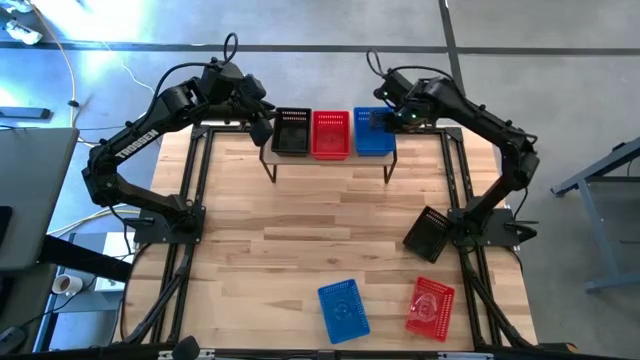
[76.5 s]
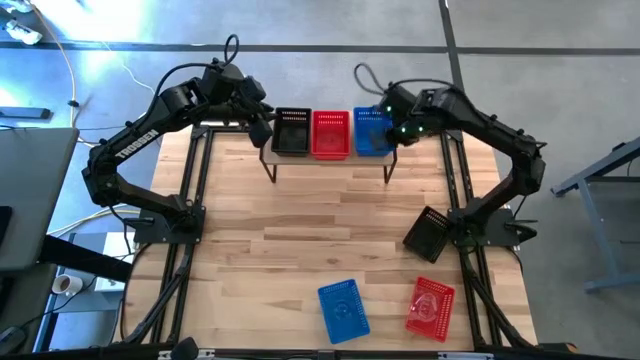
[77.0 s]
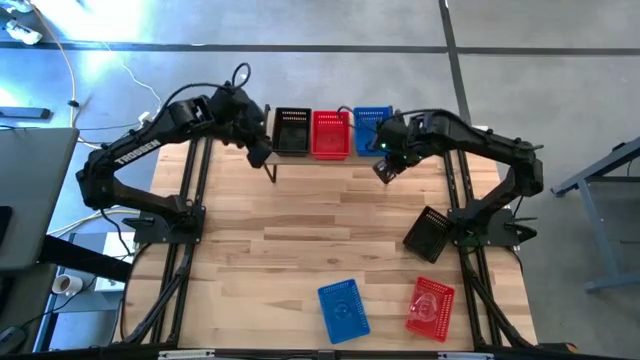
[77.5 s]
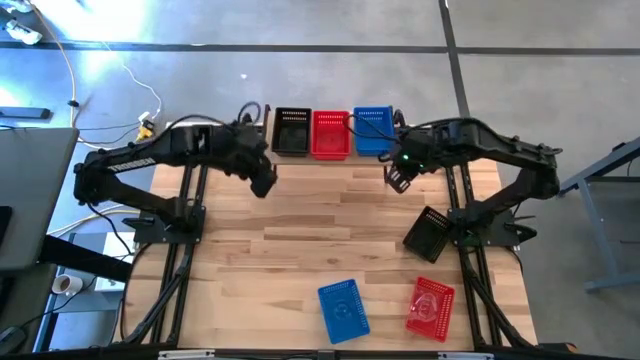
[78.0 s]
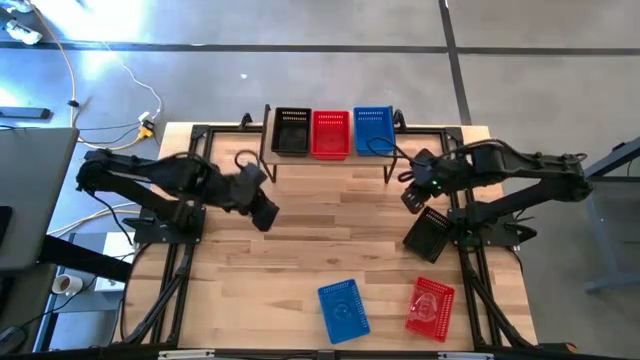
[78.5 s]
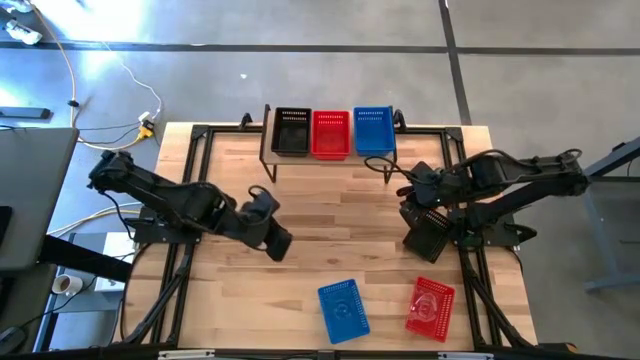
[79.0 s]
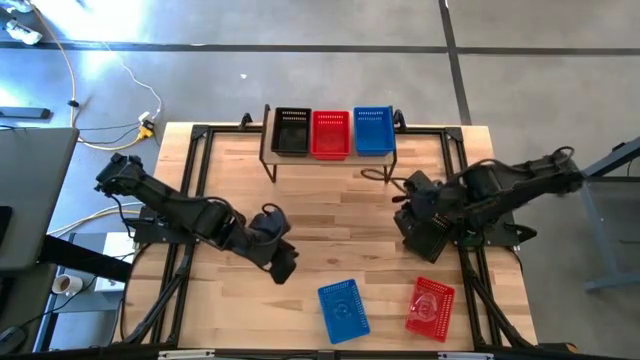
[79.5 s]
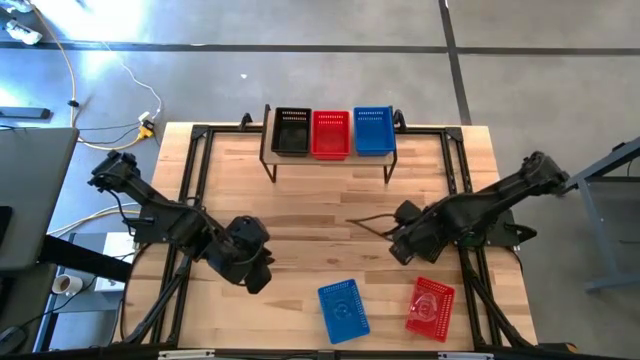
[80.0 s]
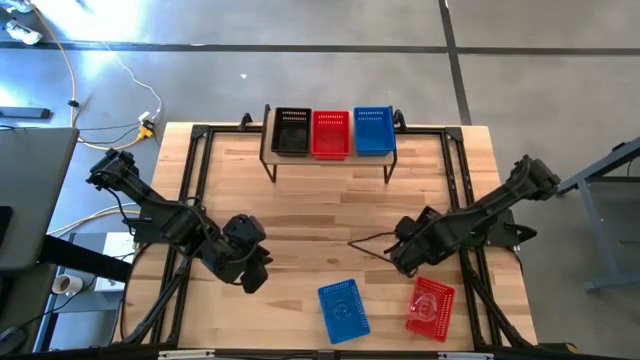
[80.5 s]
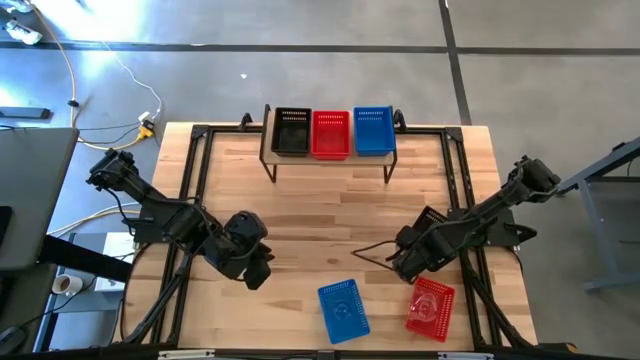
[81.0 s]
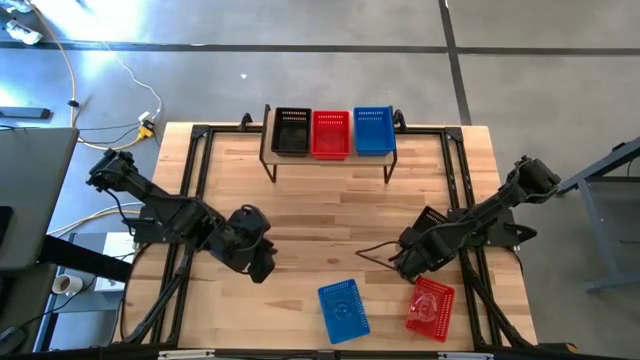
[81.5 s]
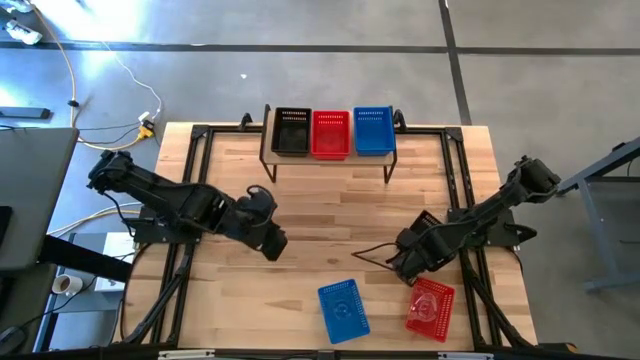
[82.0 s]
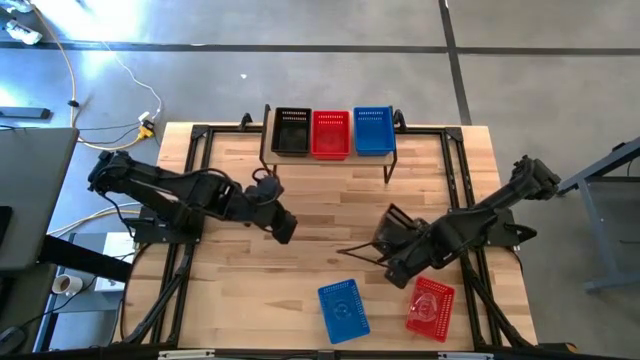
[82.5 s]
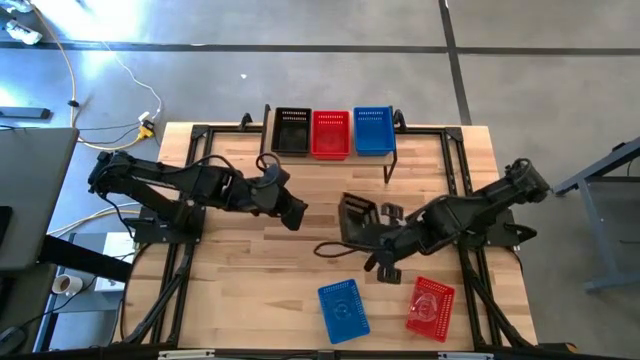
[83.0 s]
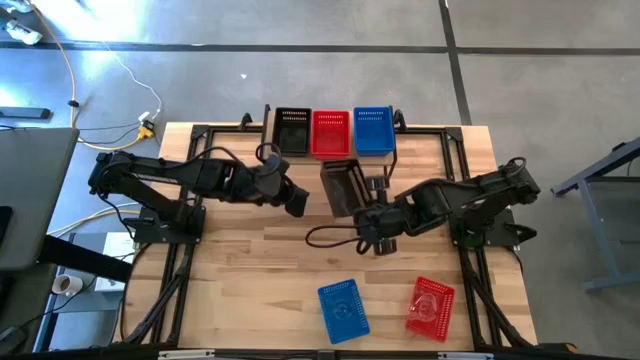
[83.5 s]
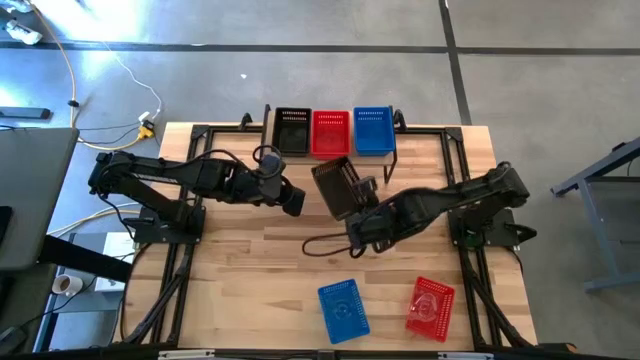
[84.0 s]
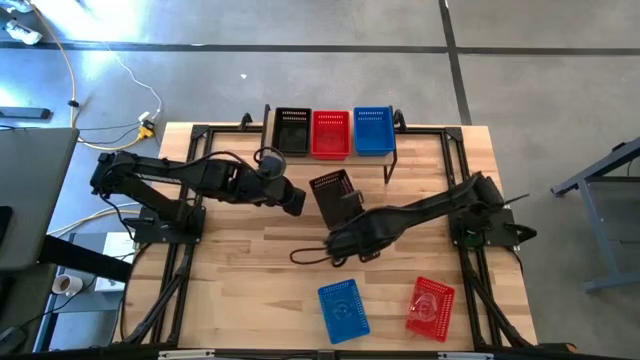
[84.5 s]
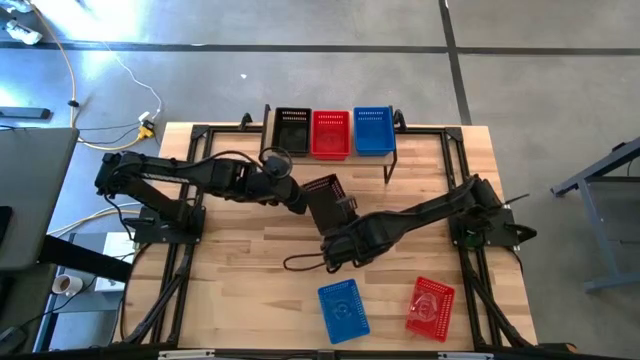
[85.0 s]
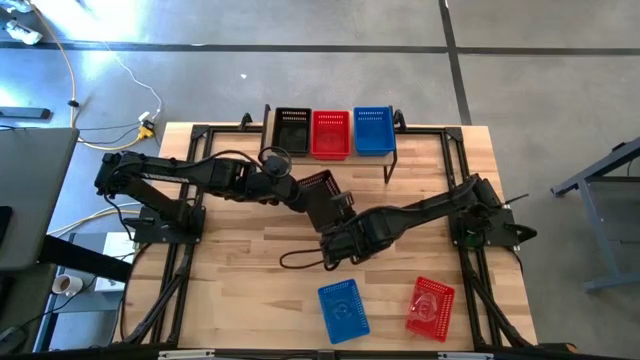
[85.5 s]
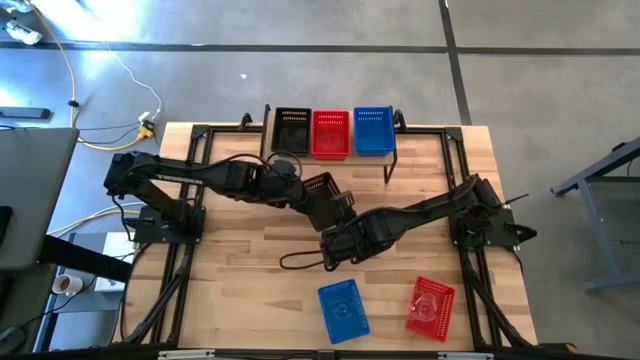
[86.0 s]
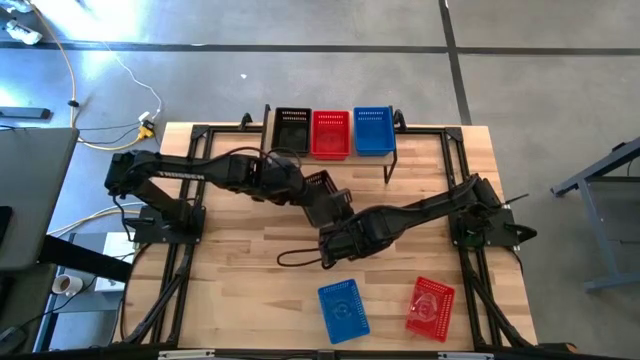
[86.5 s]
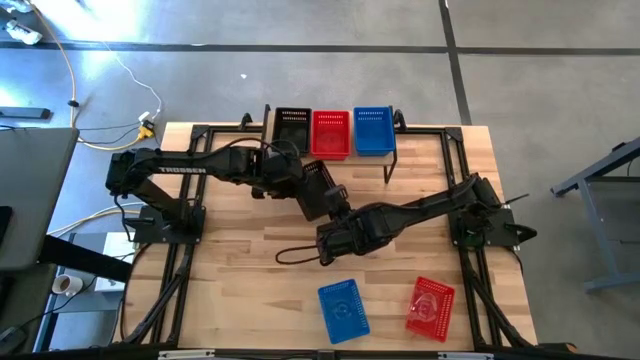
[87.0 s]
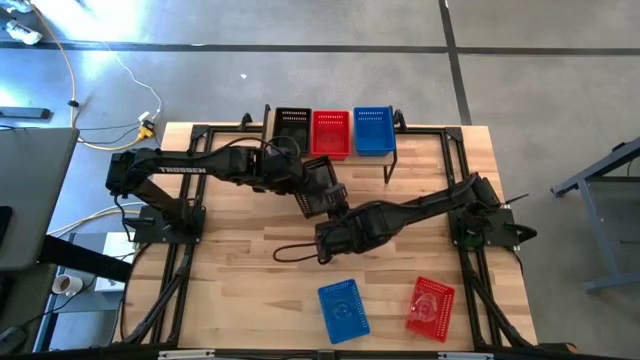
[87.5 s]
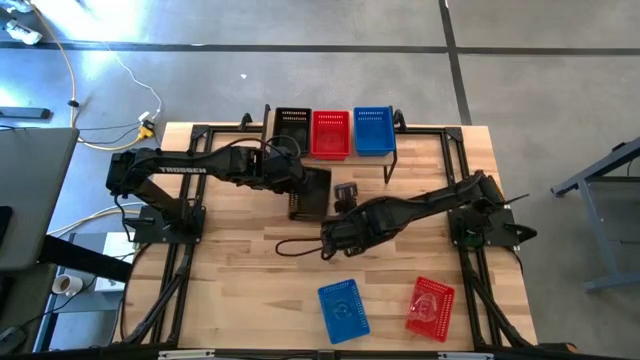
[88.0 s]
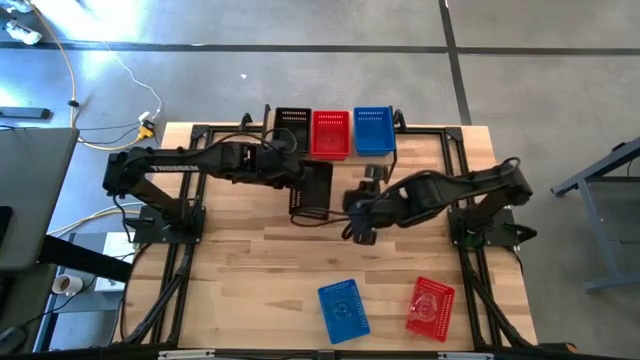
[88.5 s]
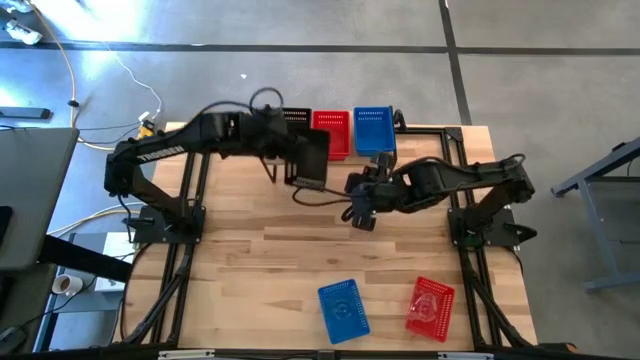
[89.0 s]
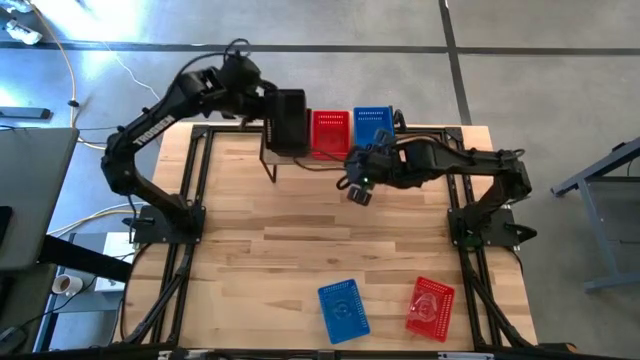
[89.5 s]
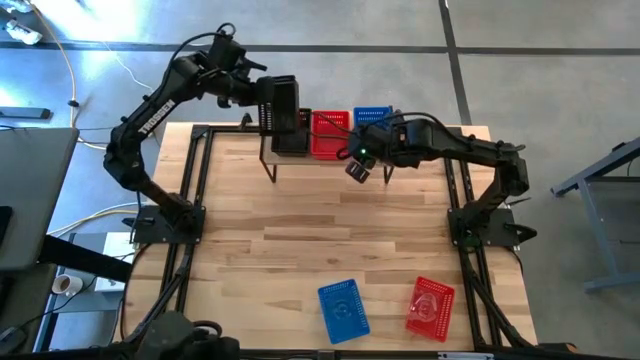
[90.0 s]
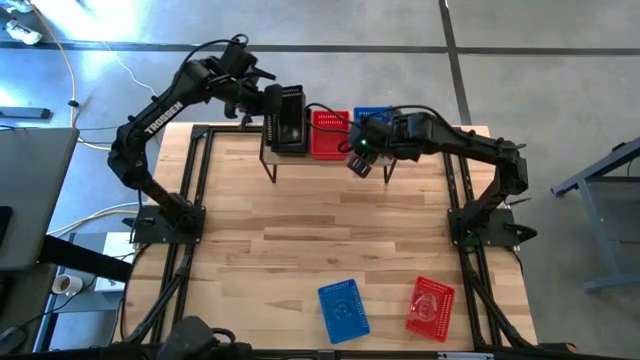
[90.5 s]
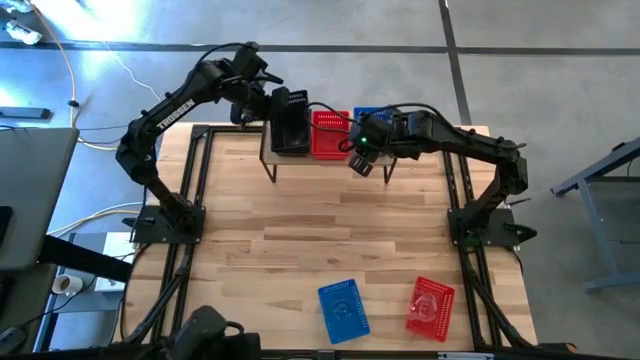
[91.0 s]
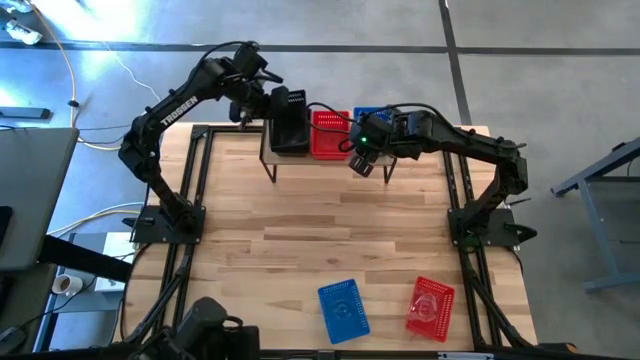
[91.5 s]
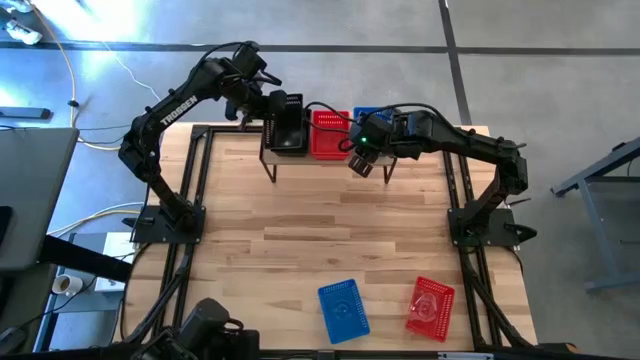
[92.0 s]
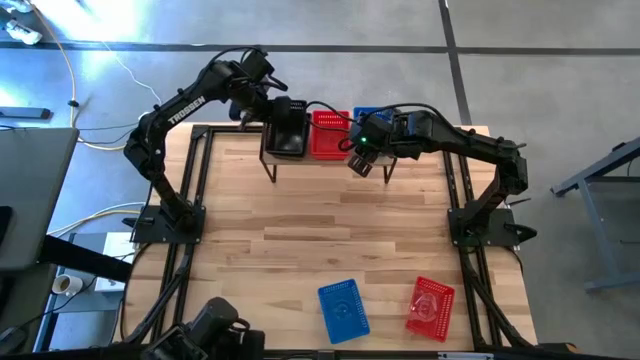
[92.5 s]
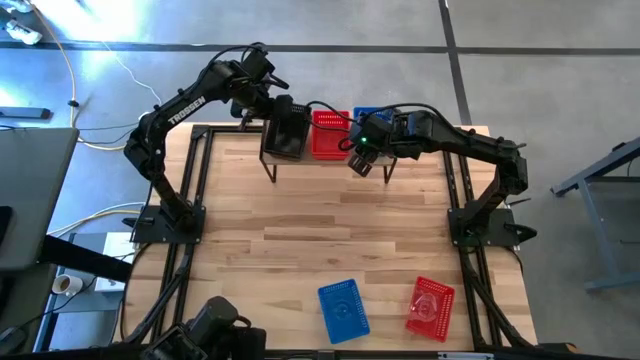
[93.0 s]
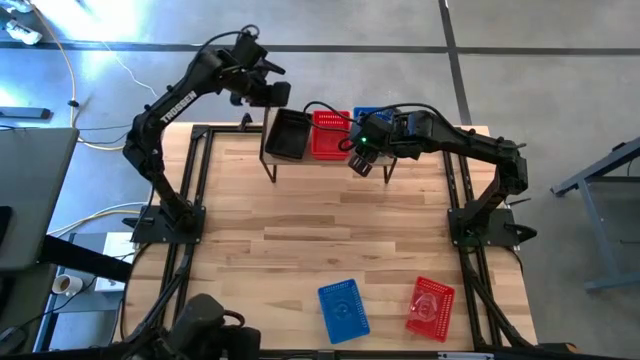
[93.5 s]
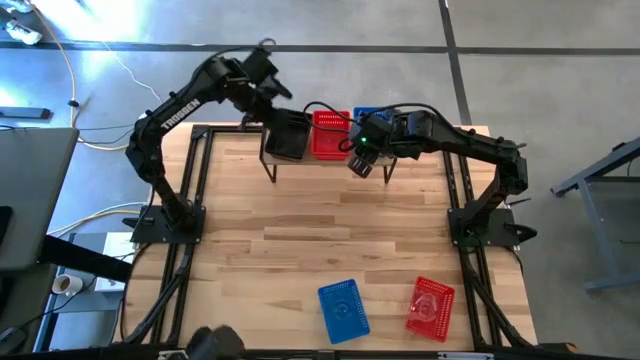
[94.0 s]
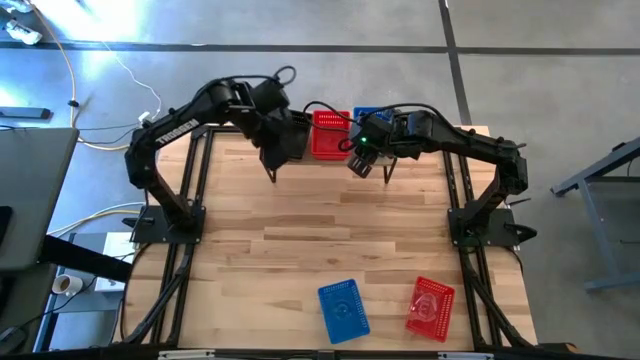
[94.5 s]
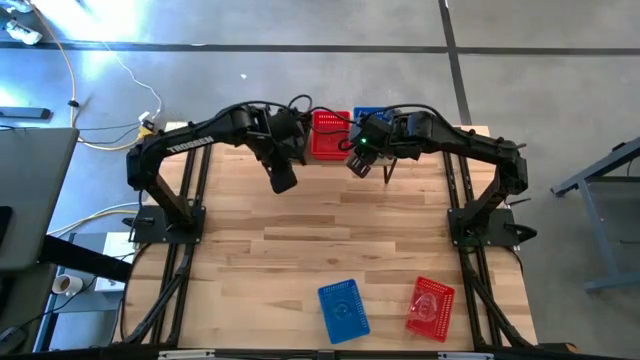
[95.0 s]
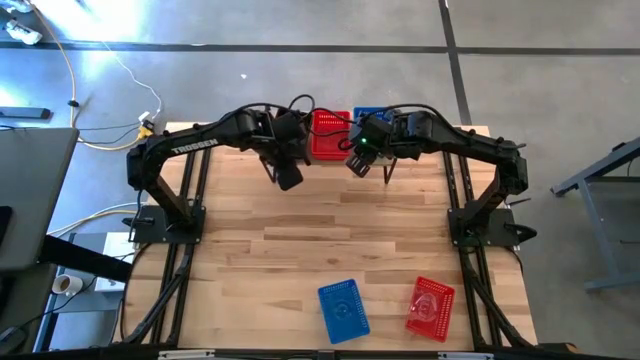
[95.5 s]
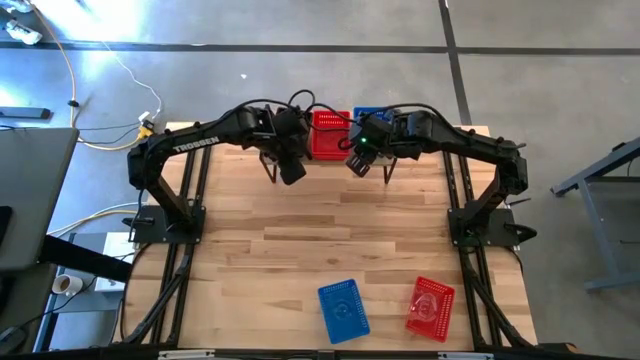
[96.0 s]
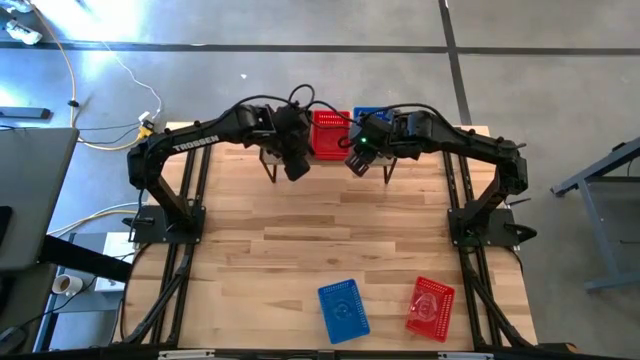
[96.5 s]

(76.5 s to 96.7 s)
Task: Stack baskets on shelf by color
Stack the black bin on top of the black bins on the shelf
